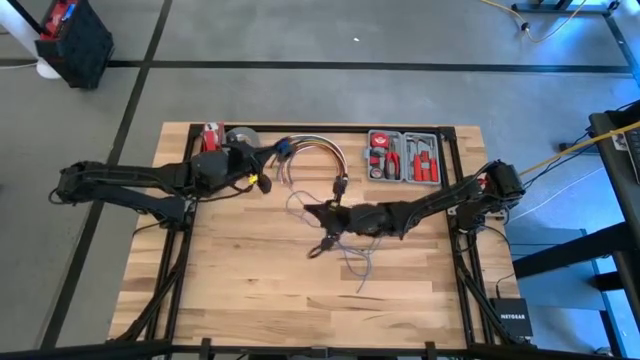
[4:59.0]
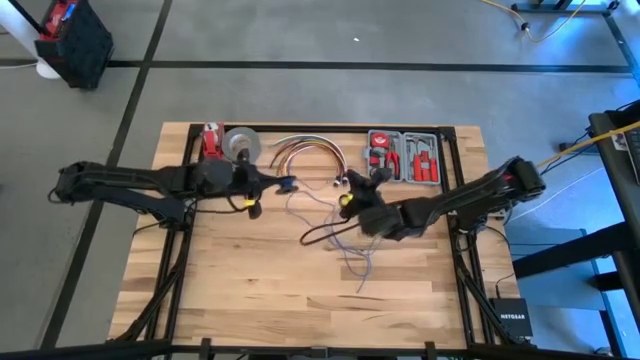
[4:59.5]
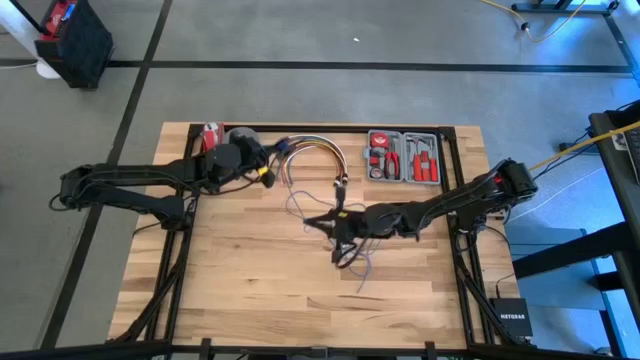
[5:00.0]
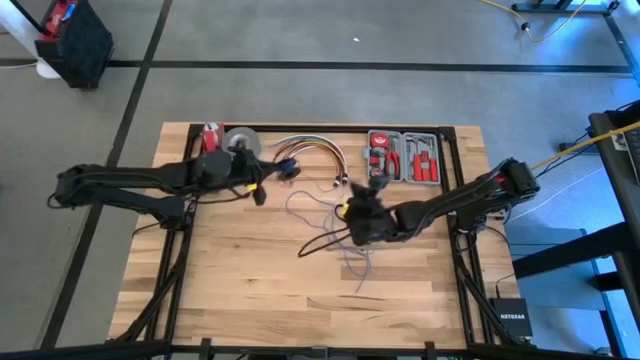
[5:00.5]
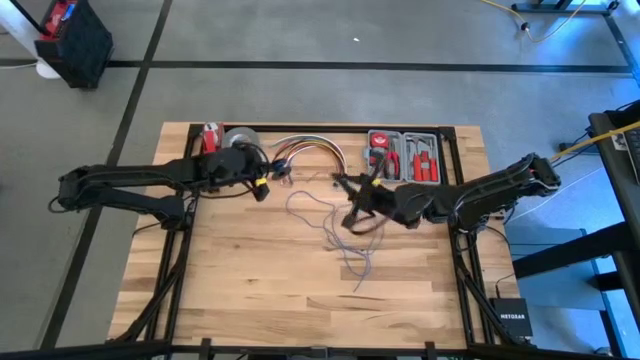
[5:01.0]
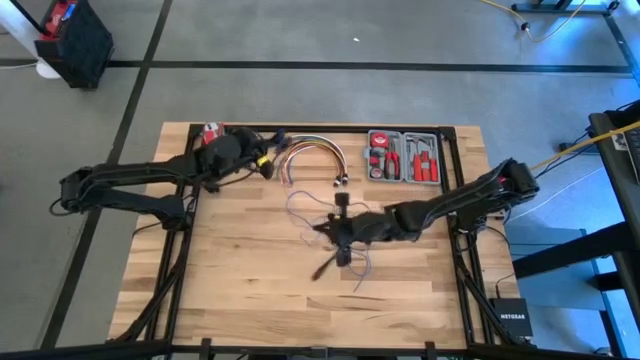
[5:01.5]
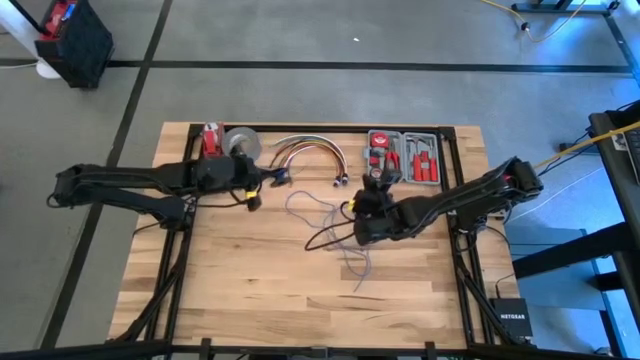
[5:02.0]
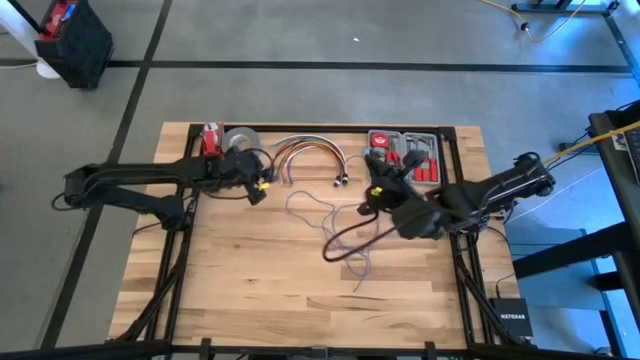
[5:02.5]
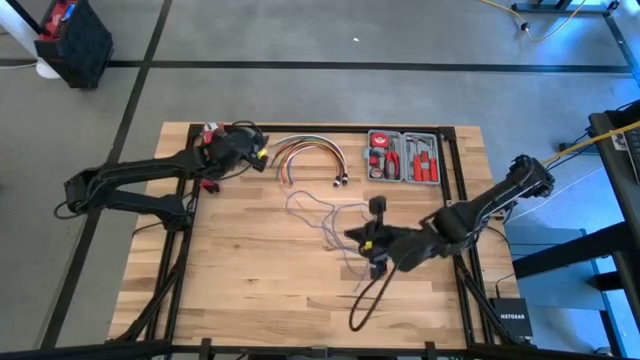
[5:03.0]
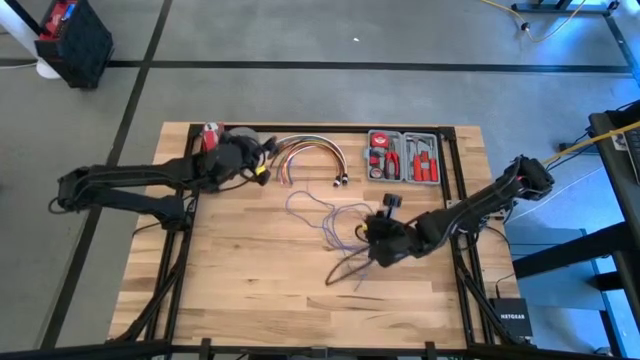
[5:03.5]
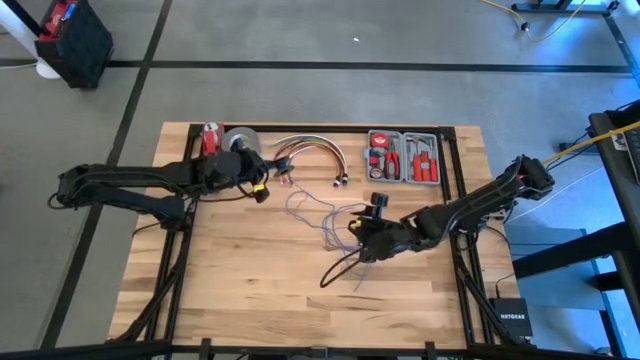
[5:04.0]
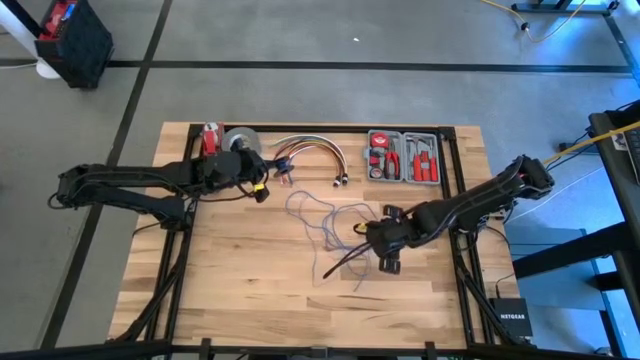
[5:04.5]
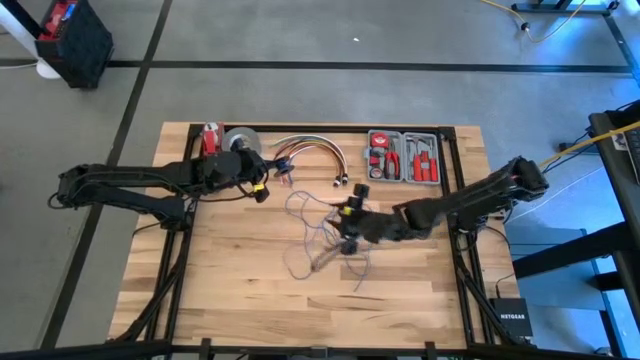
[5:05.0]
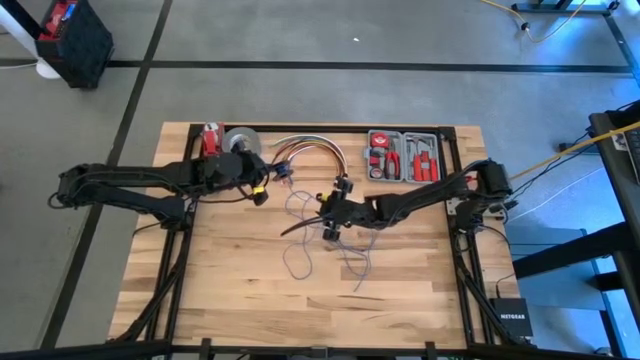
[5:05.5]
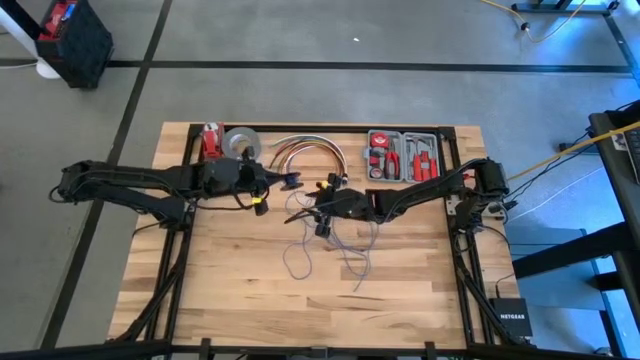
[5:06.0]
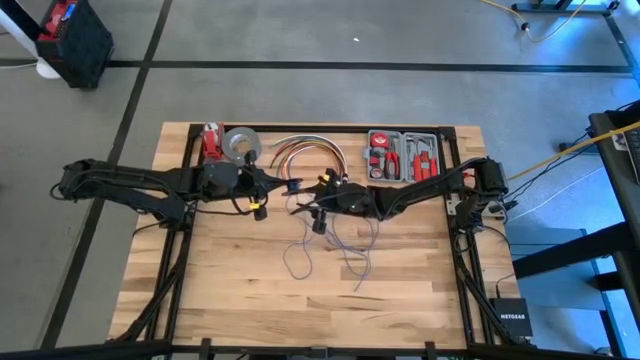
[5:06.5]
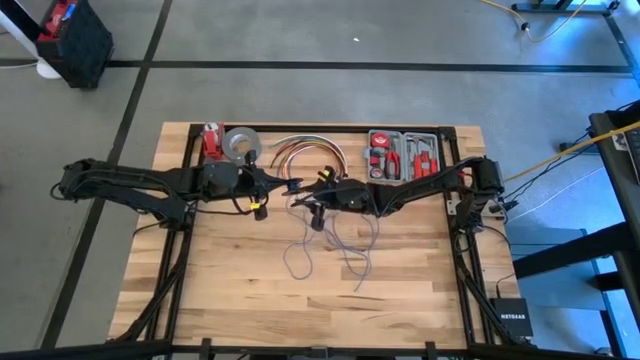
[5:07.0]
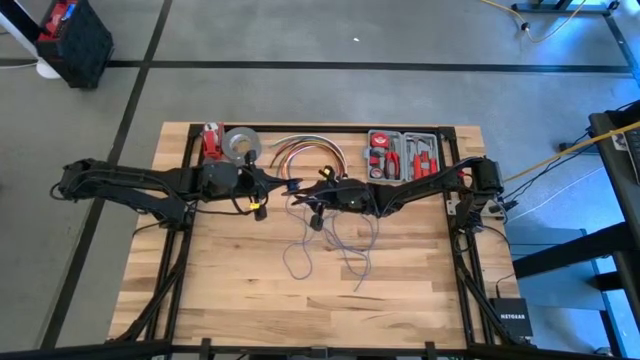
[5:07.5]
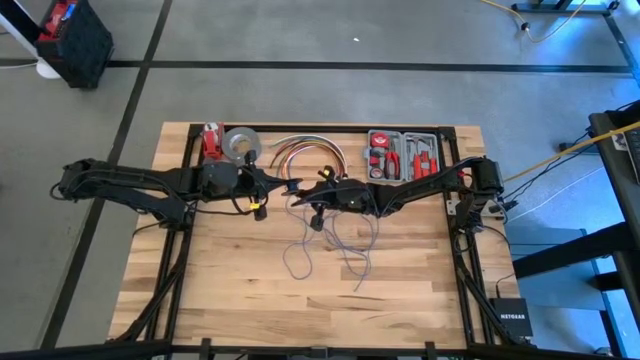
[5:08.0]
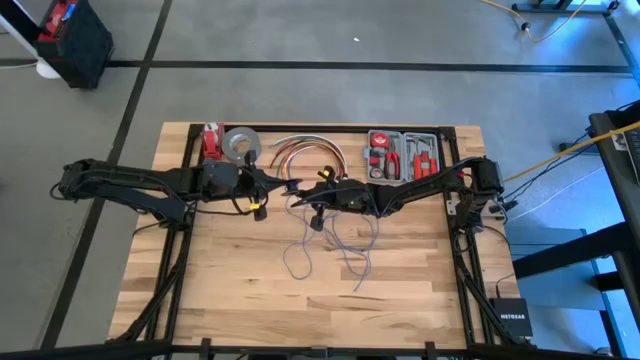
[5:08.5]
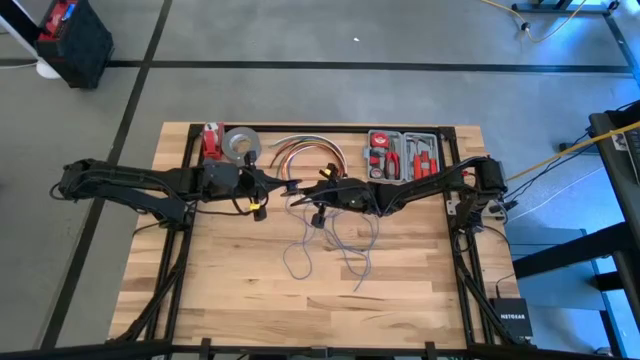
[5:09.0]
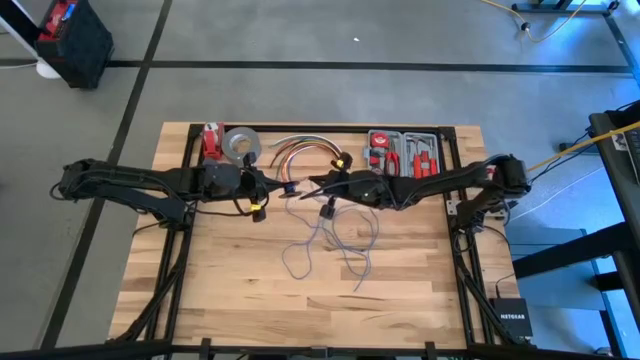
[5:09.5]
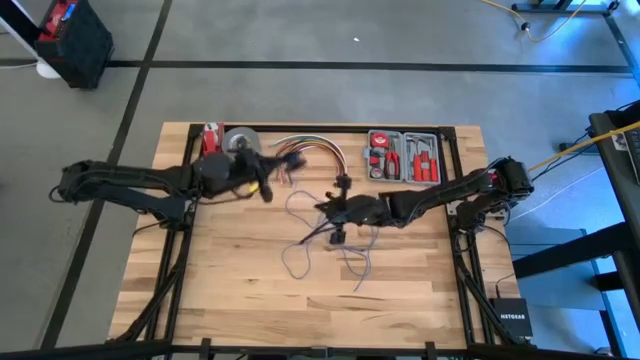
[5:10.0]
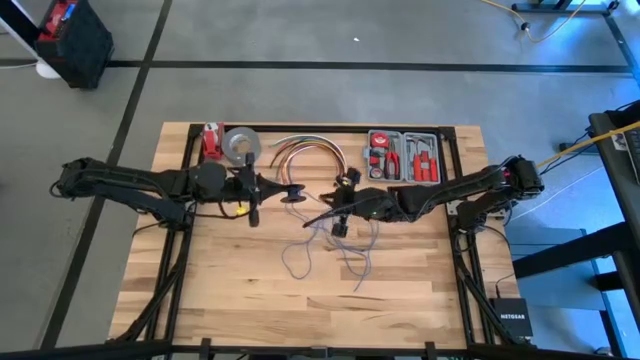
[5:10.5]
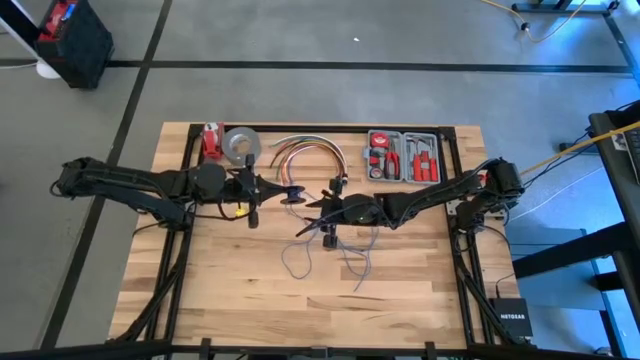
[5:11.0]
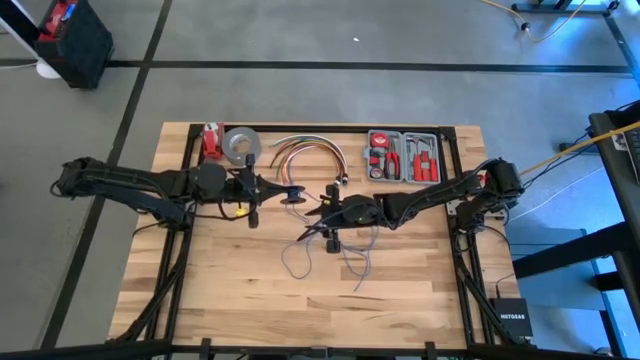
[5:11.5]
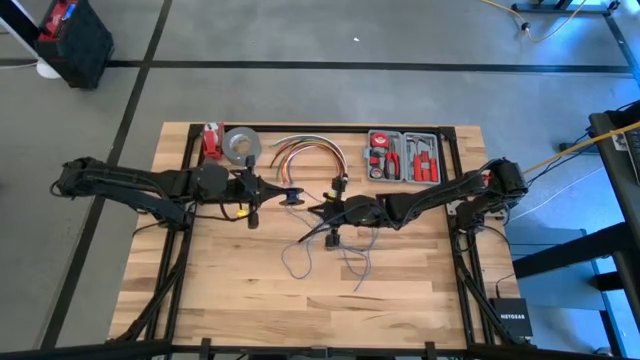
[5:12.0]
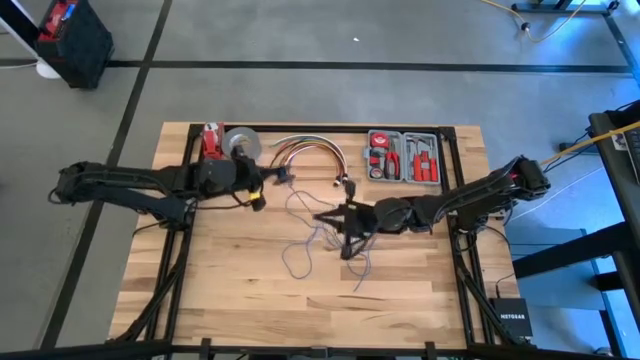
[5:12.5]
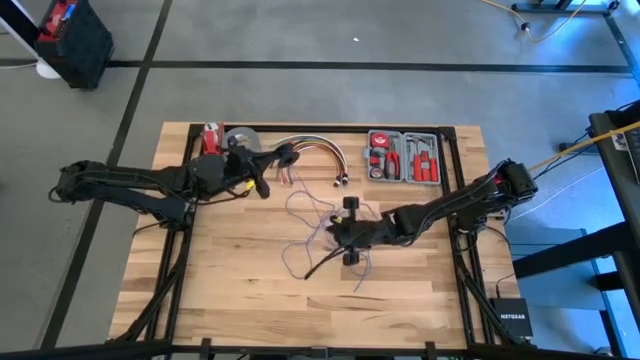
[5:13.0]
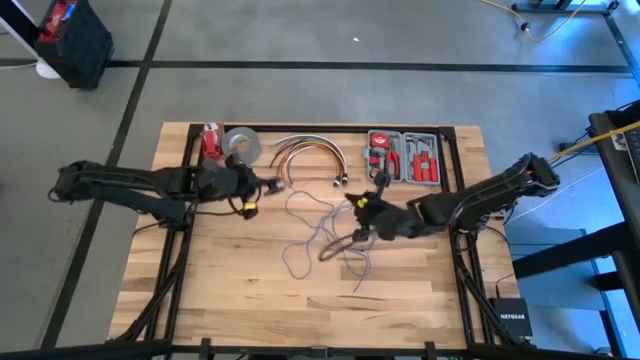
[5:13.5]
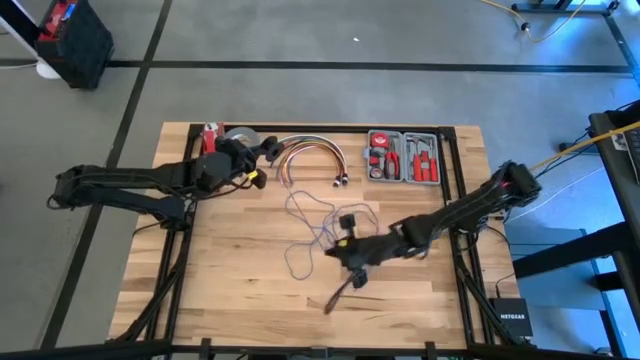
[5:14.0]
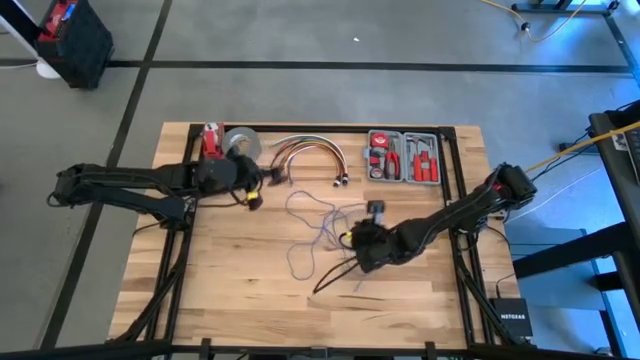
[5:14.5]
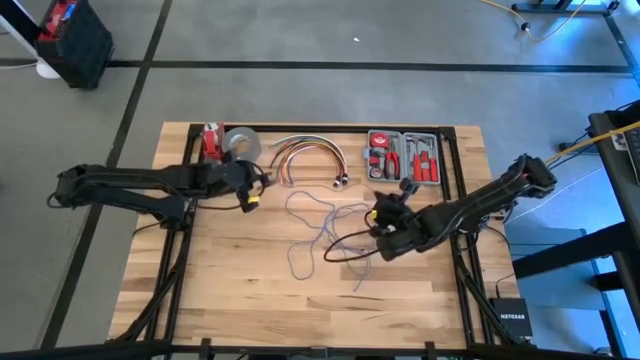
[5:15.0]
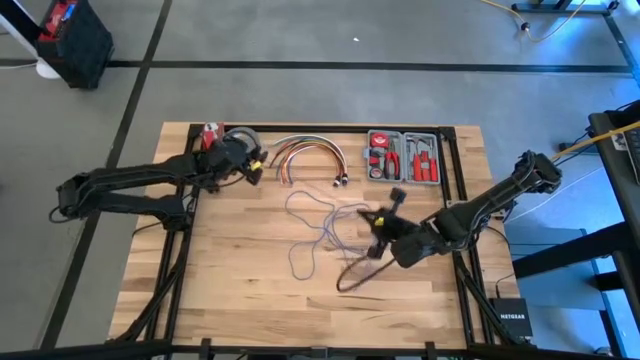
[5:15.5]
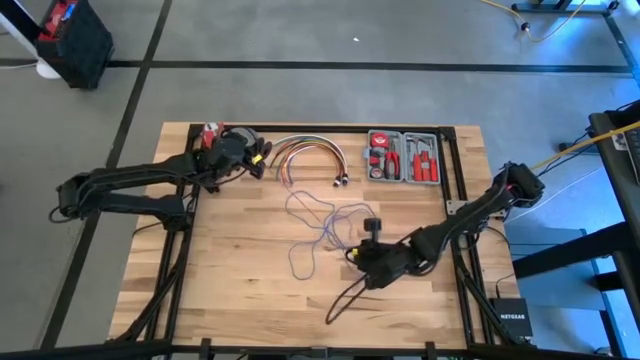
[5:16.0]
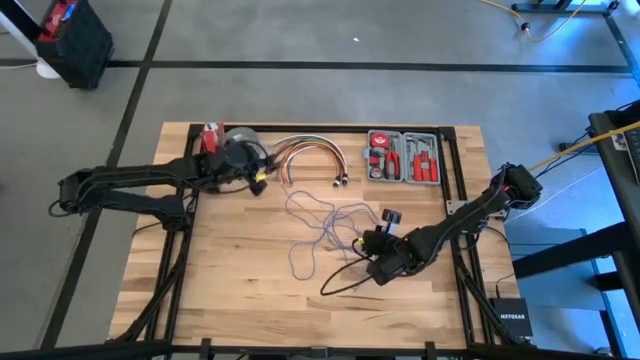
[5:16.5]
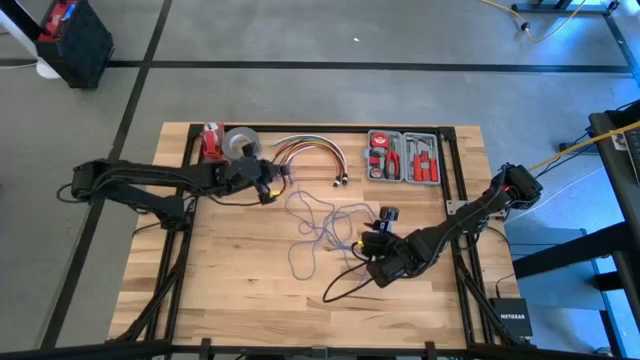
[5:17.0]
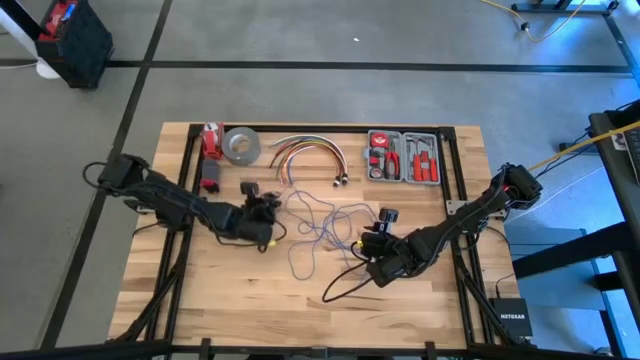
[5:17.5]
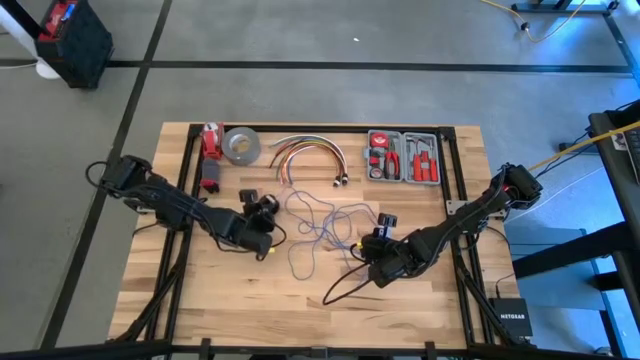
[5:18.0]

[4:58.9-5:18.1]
Task: Coil cords
Uncoil the blue wire from the black spool

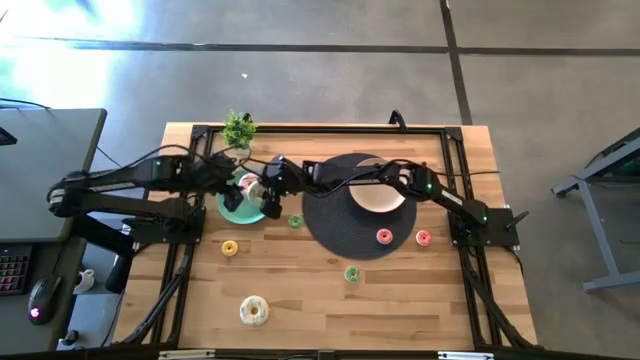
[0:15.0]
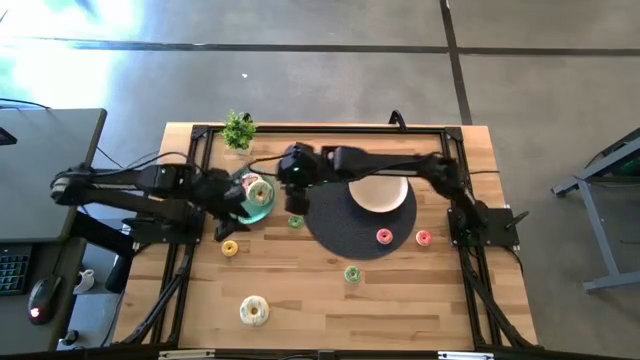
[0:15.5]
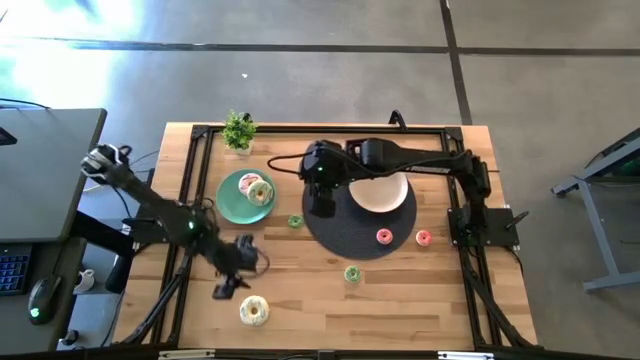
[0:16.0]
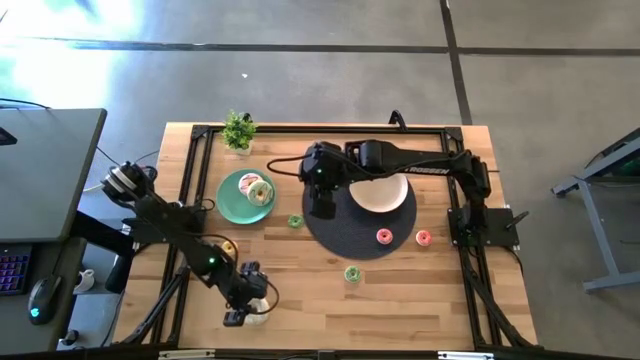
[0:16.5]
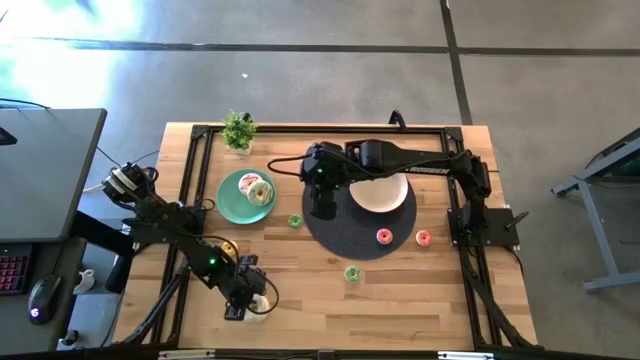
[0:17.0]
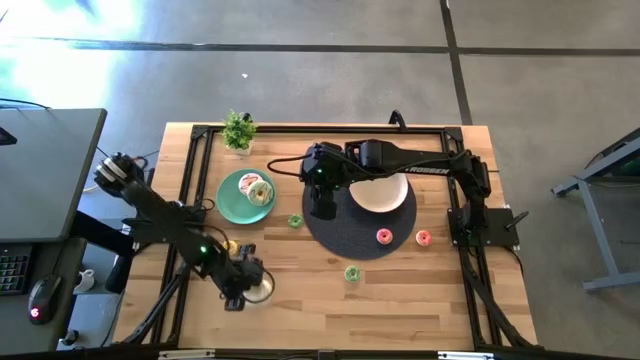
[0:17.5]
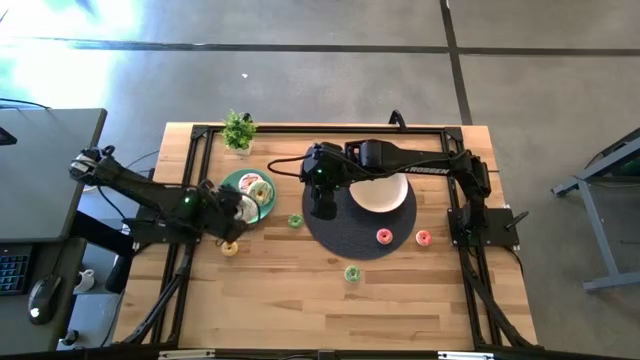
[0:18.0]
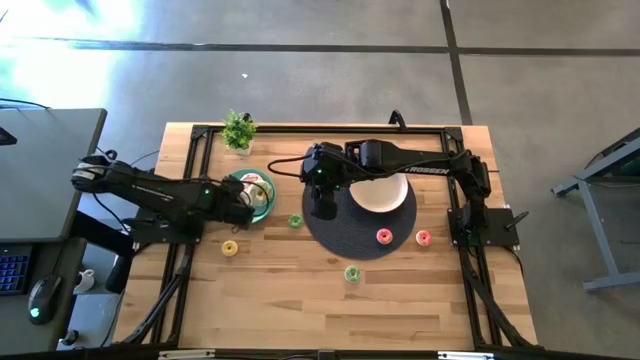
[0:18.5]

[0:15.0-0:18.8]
Task: Pick & Place donuts
Put the white donut into the green plate
